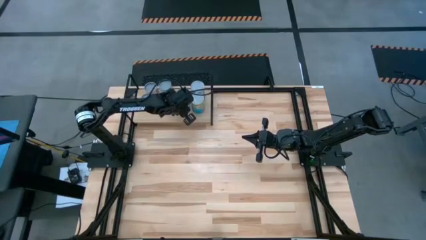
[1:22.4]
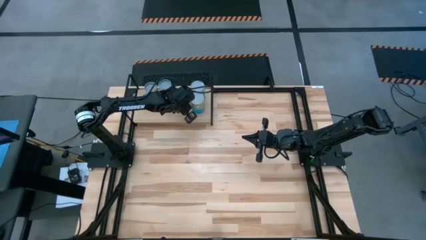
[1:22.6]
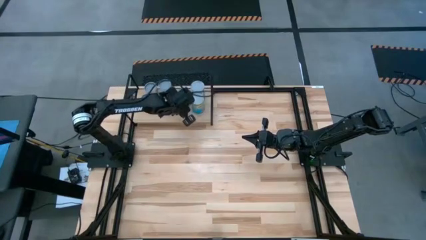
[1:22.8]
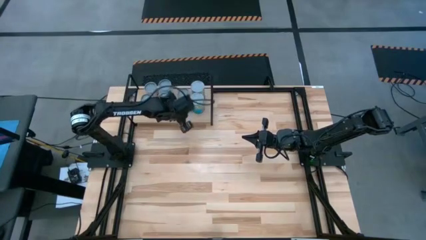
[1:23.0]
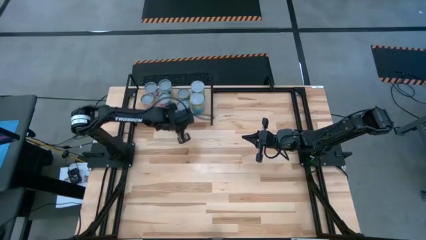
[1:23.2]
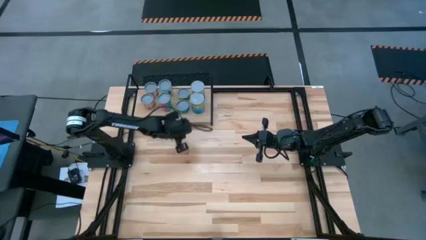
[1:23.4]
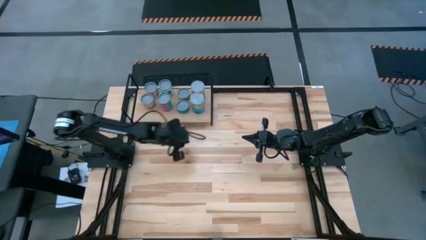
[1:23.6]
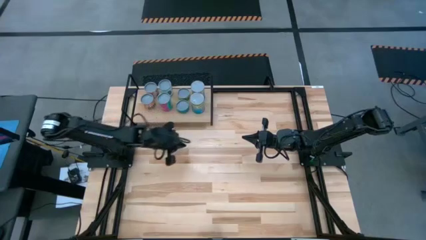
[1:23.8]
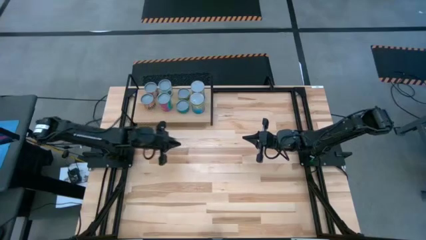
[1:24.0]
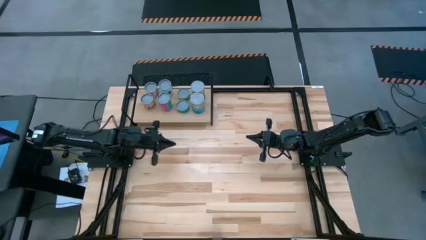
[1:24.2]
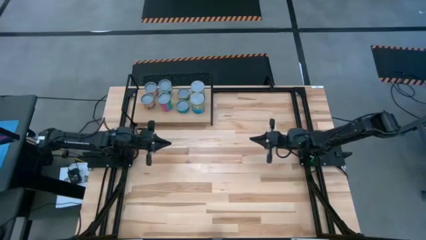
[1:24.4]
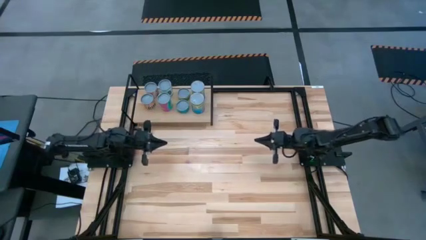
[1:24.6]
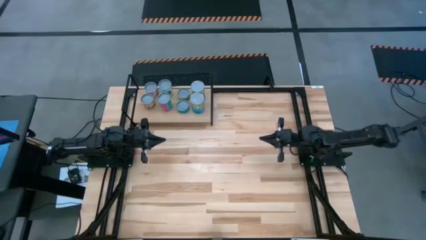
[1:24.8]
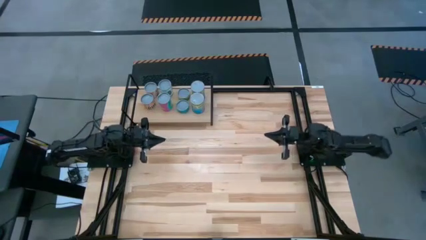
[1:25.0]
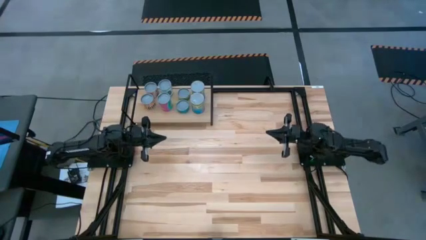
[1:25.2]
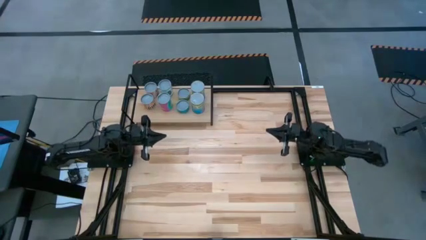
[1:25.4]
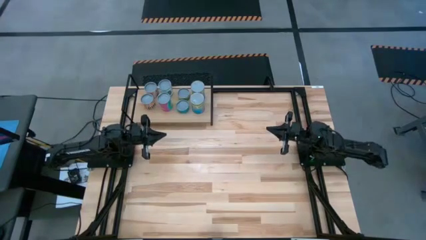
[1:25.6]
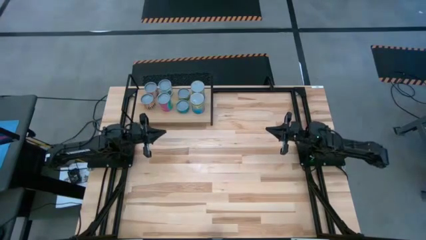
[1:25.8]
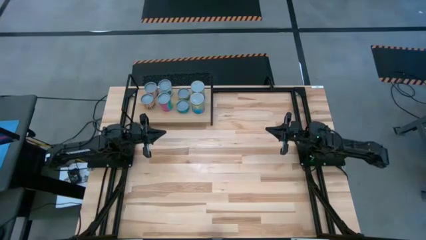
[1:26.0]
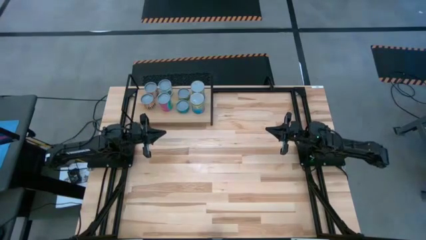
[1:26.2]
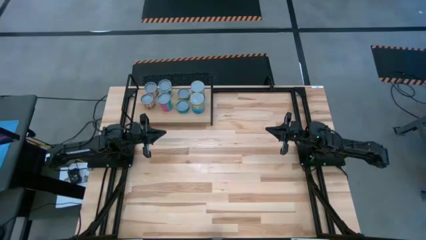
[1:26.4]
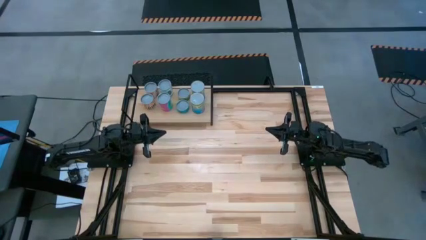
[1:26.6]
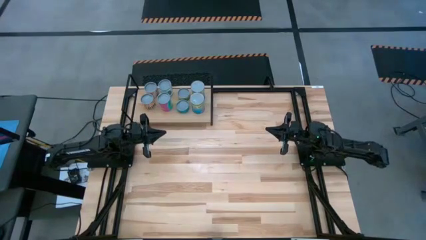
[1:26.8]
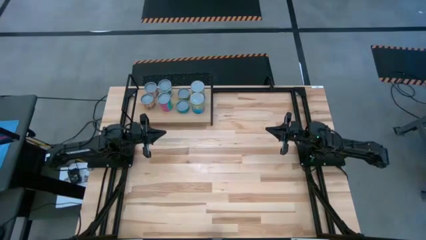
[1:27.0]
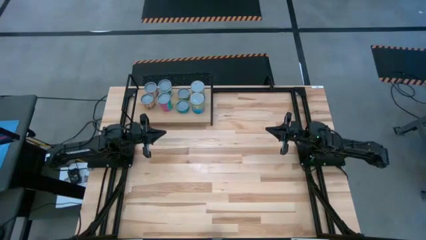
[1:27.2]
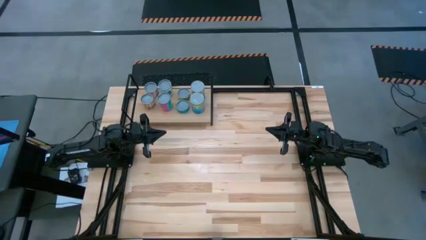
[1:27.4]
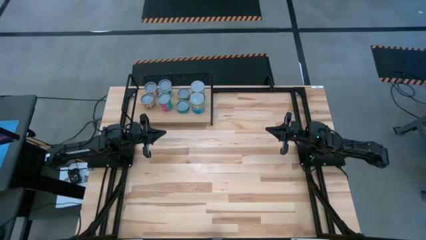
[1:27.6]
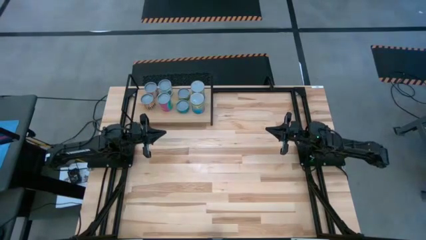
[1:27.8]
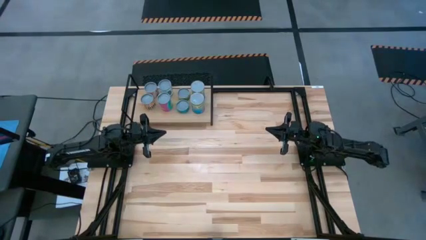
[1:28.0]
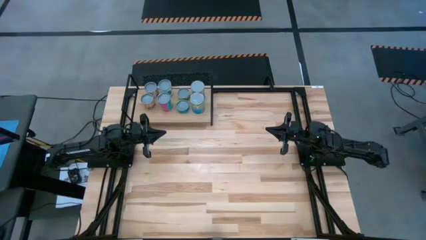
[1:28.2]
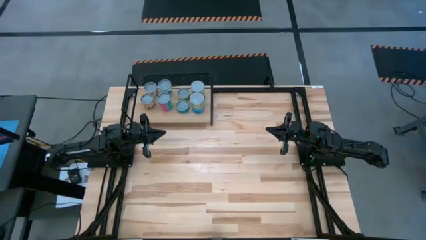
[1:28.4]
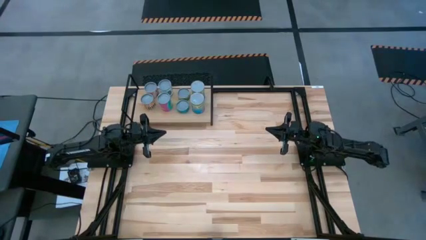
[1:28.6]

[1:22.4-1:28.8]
Task: Pick and place cans onto a shelf
Return to Home Position

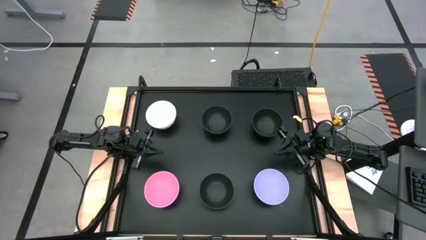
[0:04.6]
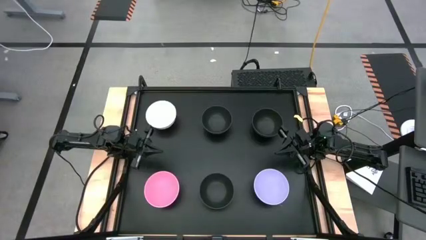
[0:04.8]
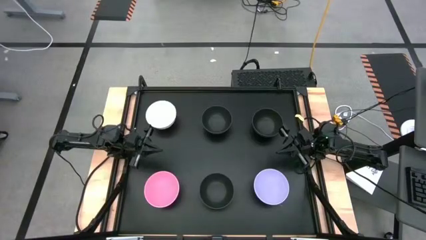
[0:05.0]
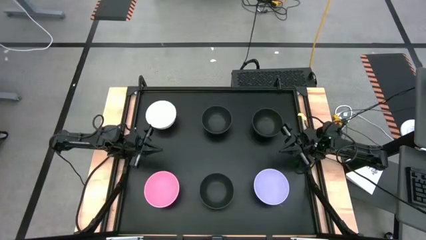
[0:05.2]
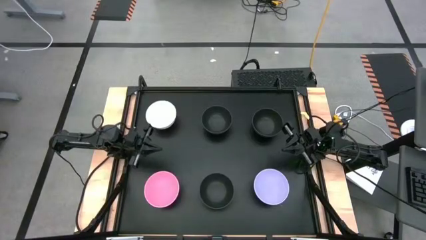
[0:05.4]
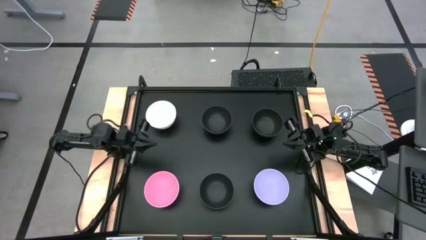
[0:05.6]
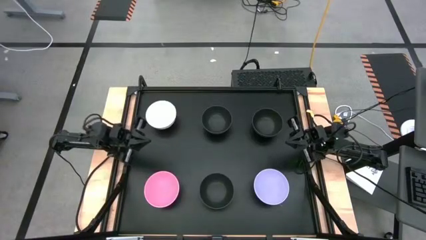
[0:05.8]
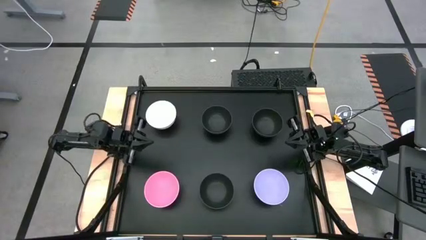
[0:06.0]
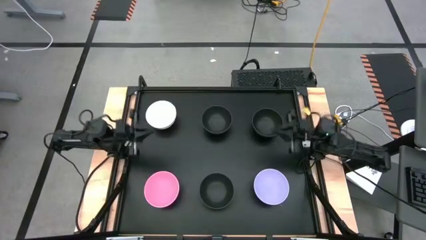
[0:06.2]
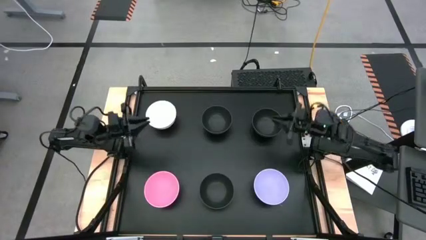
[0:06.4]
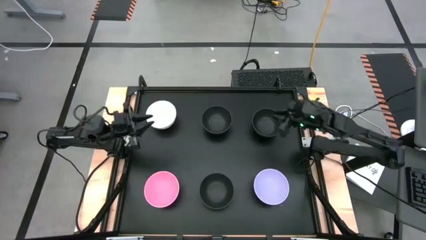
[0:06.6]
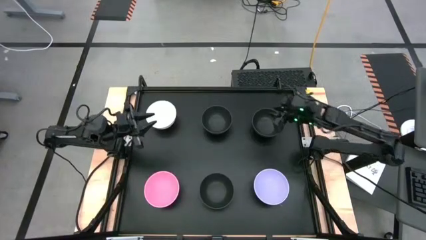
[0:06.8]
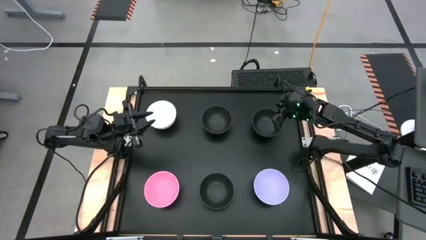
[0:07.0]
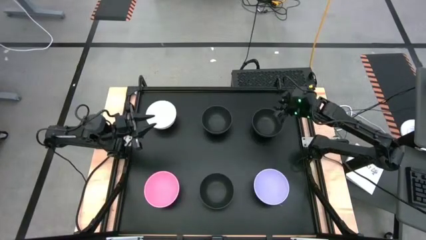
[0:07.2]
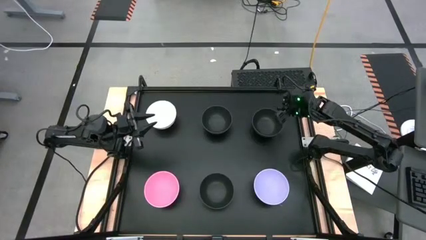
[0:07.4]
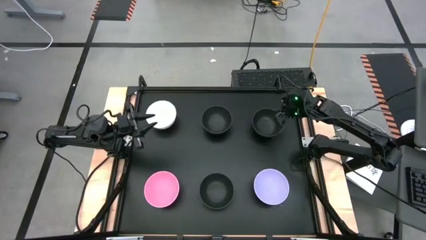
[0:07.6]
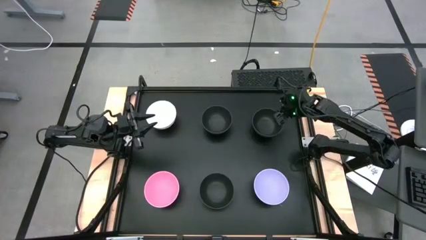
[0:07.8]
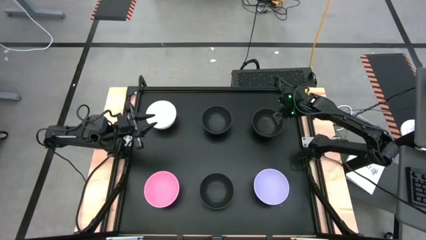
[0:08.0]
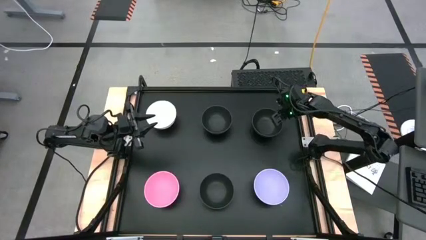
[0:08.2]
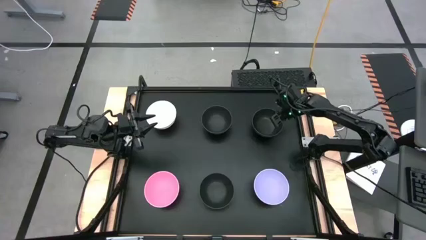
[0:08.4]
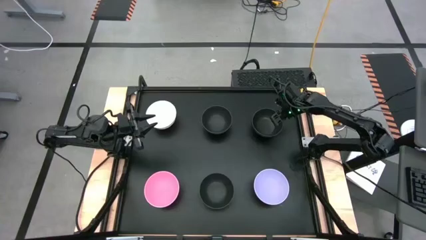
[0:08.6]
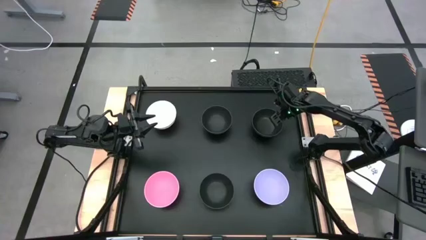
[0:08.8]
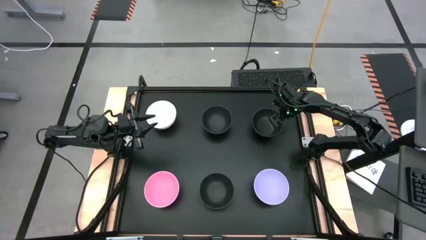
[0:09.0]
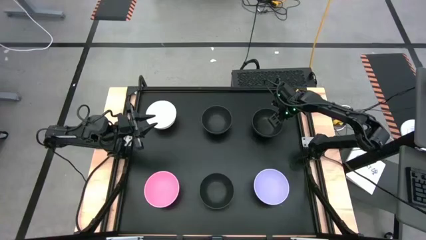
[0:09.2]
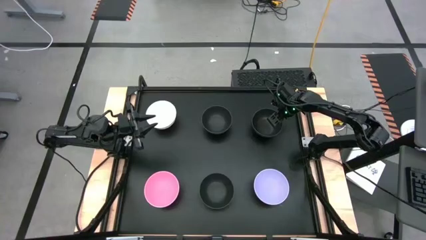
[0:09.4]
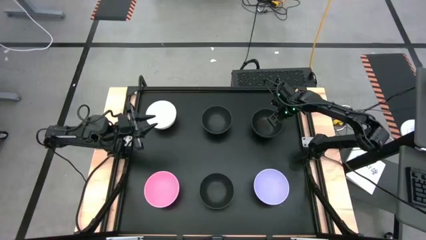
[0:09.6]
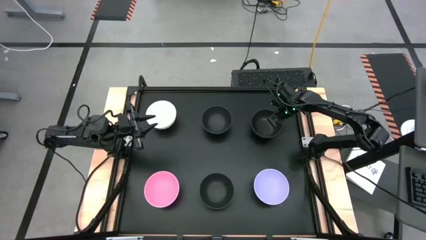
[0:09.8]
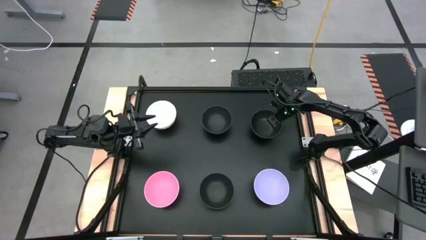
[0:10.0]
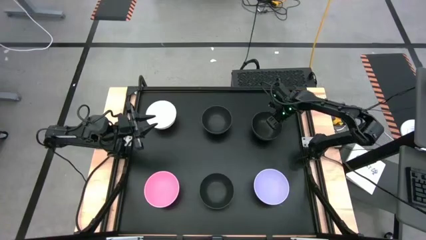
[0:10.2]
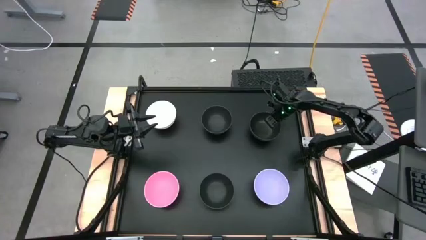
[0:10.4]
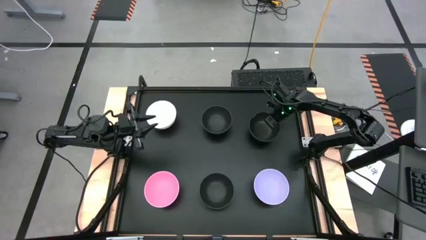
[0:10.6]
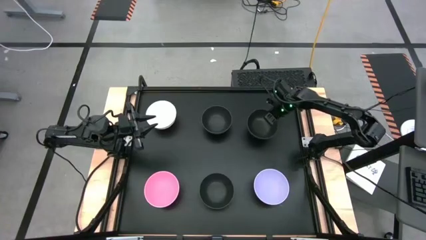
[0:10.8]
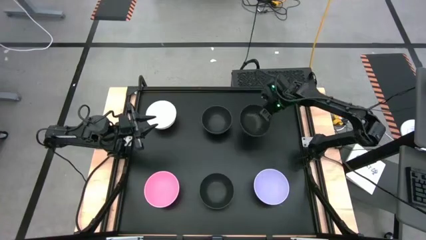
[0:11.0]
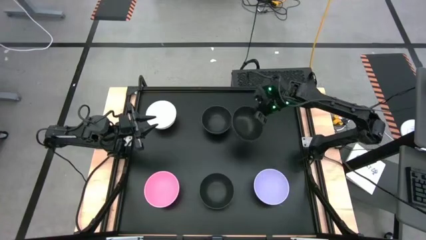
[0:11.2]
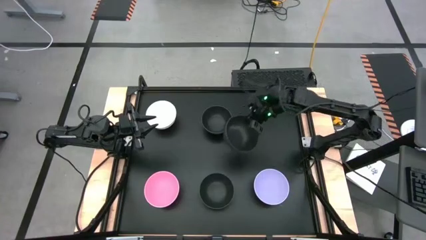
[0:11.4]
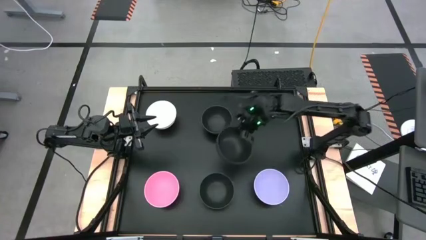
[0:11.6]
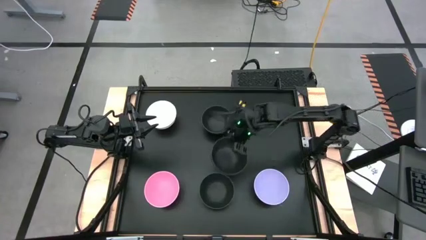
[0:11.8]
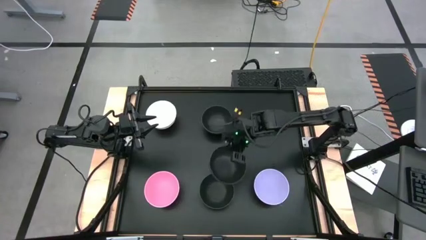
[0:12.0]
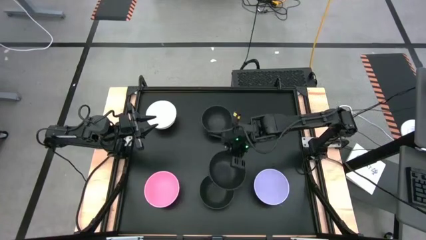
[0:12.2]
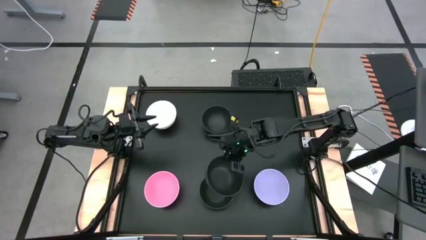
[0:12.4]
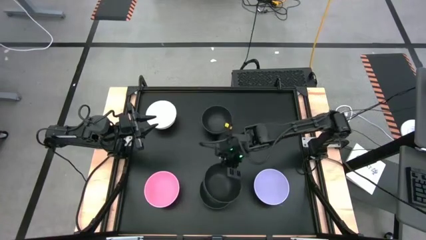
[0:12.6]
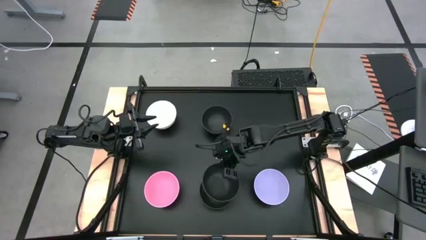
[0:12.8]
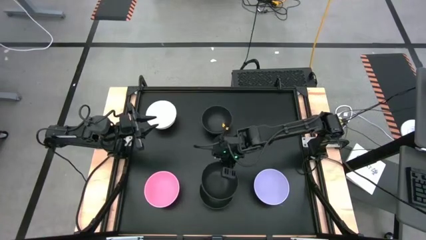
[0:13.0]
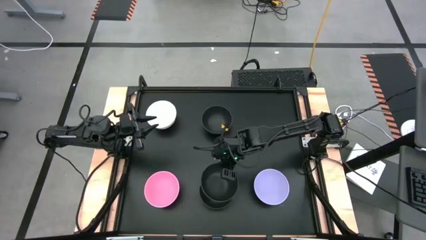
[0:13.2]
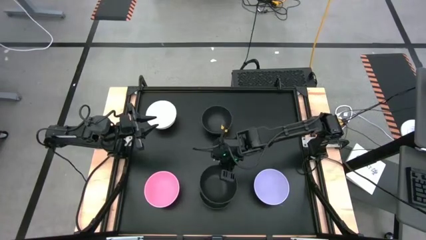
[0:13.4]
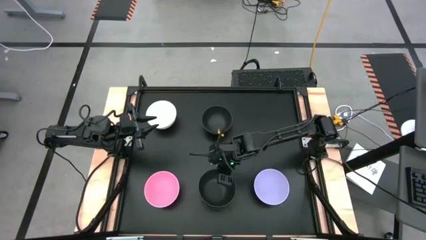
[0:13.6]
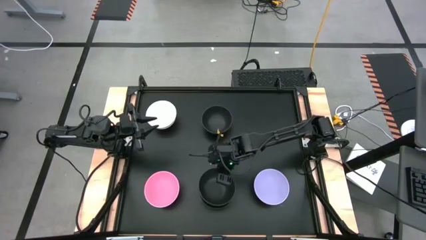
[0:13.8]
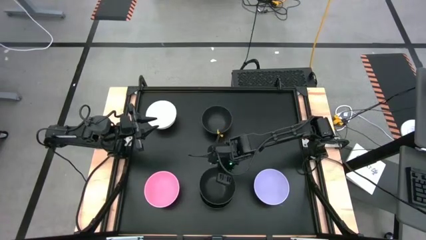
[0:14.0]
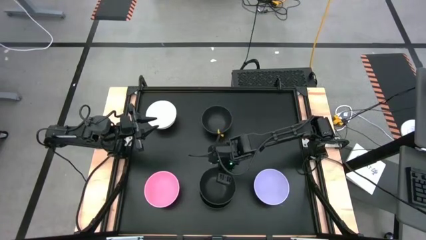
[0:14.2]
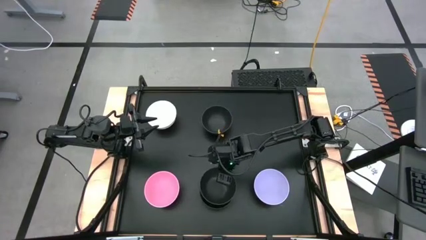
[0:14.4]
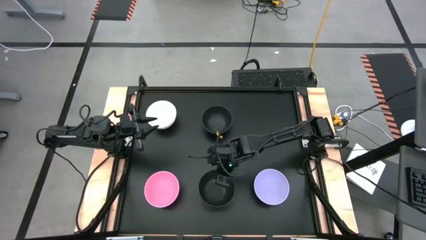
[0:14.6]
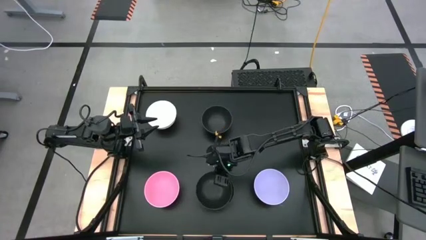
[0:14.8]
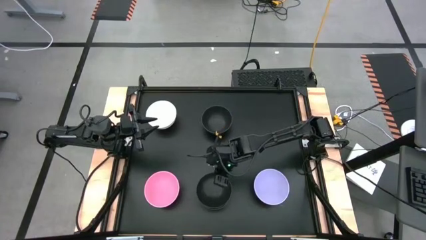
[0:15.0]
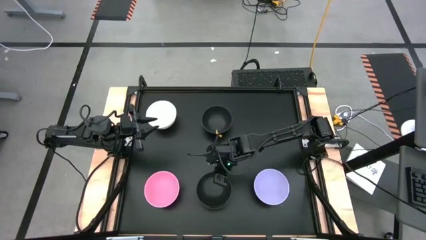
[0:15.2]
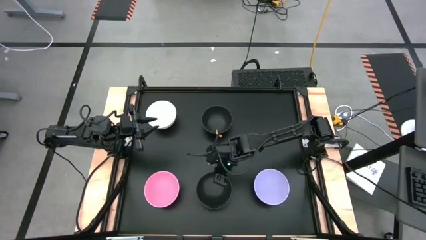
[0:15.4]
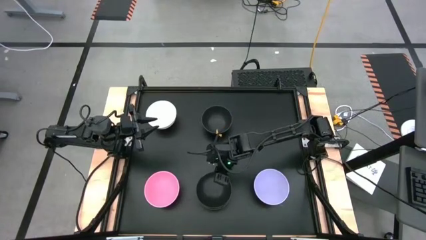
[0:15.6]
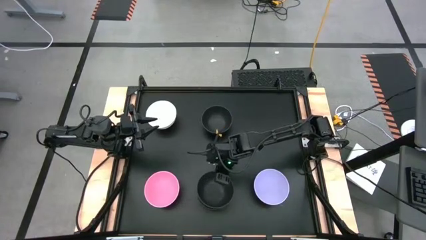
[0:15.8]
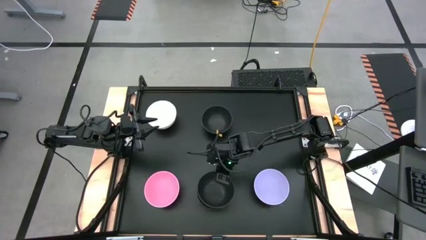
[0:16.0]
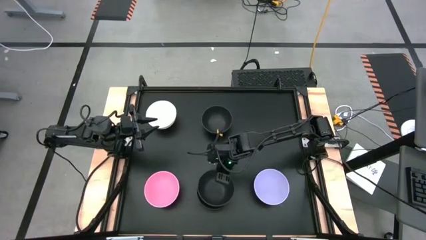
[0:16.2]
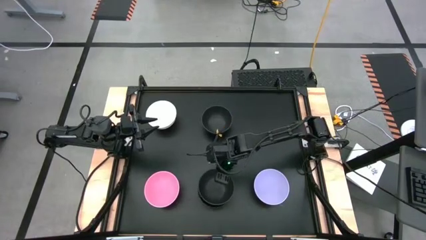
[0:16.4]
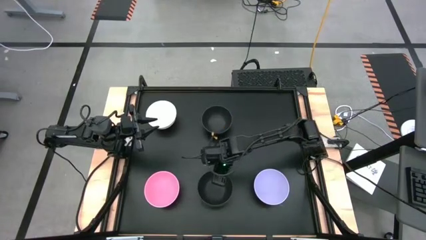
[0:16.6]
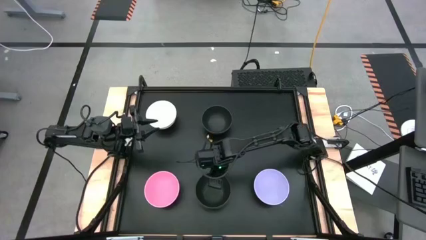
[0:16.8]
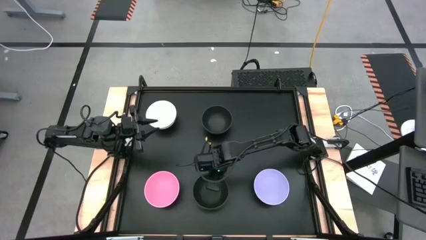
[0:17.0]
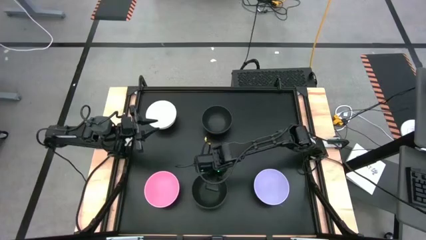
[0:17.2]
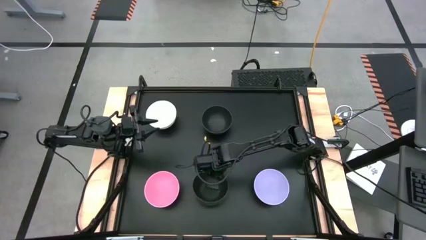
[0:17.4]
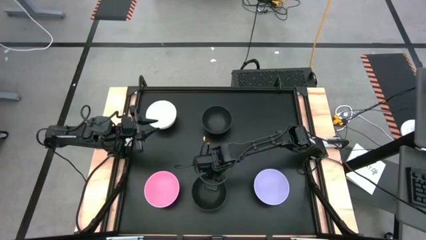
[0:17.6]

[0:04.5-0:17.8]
Task: Nest bowls inside each other
Stack the top right black bowl on top of the bottom black bowl
